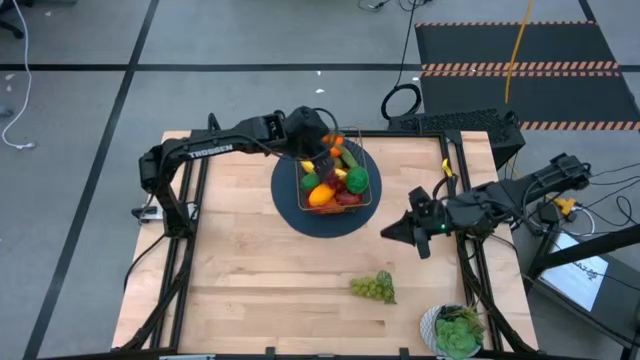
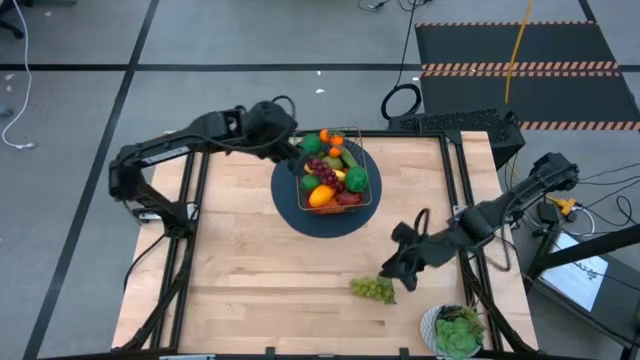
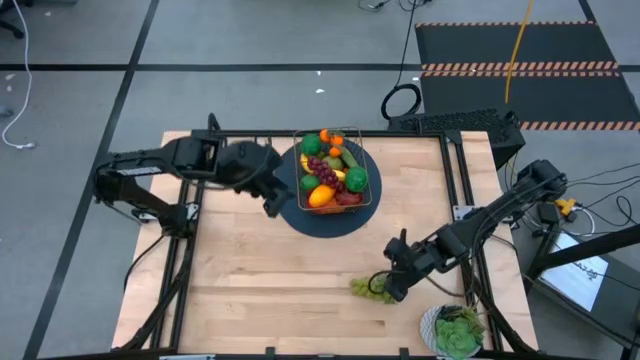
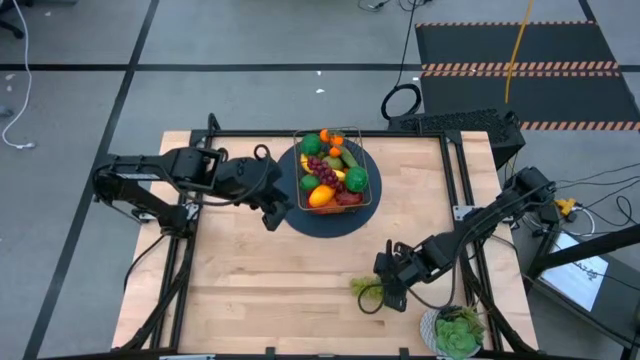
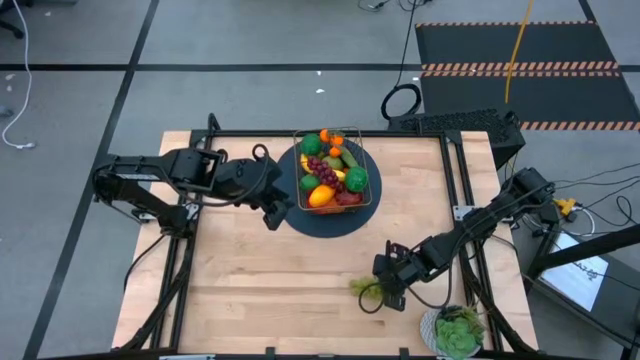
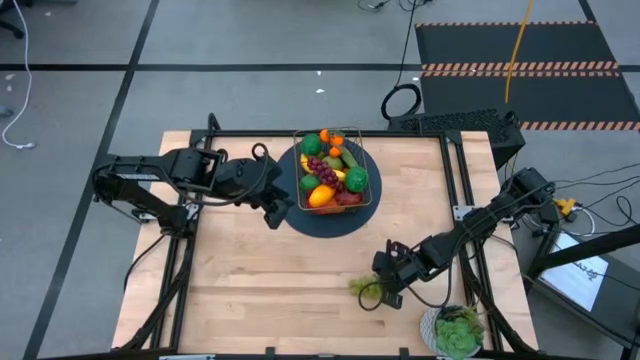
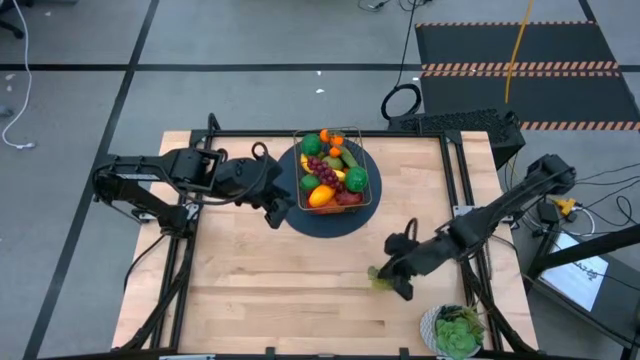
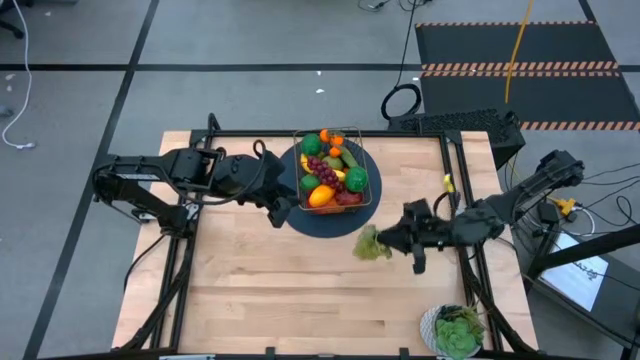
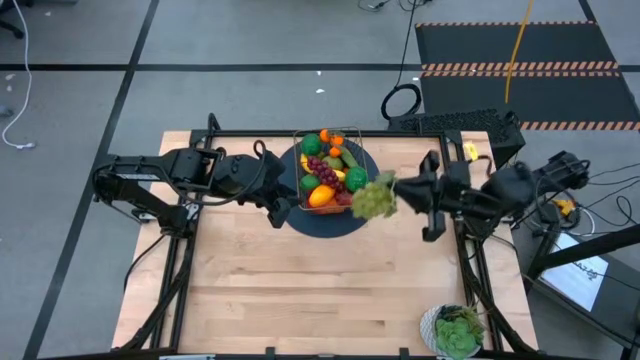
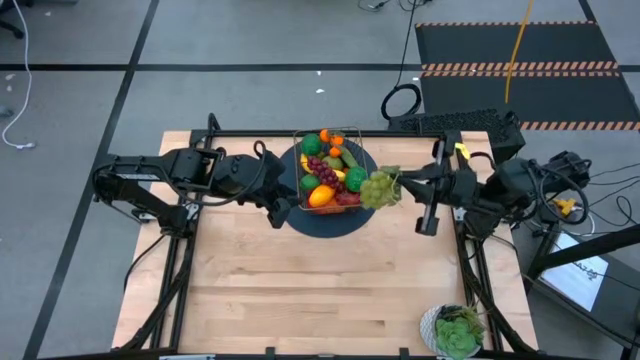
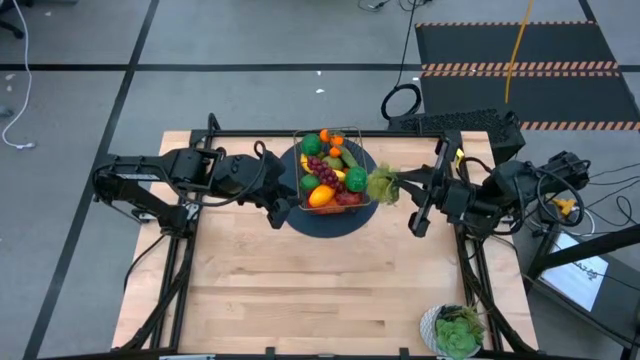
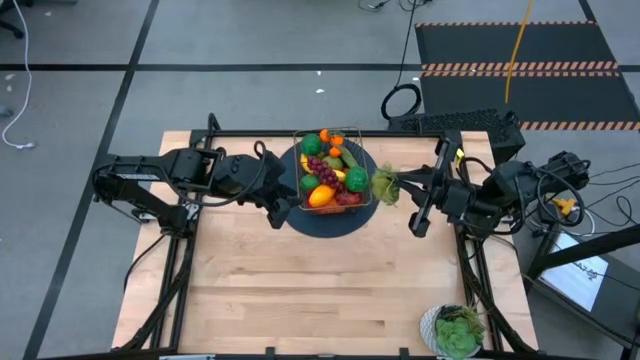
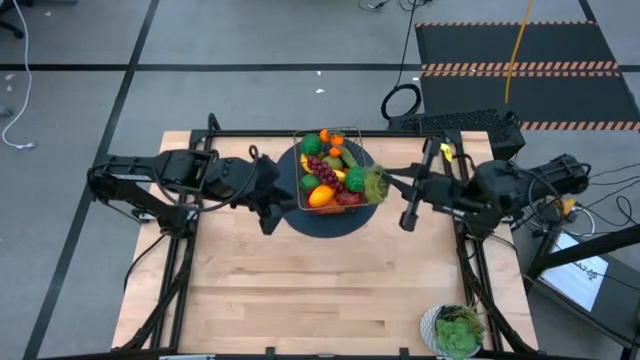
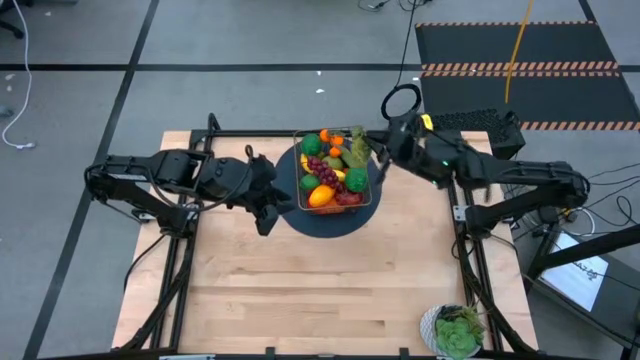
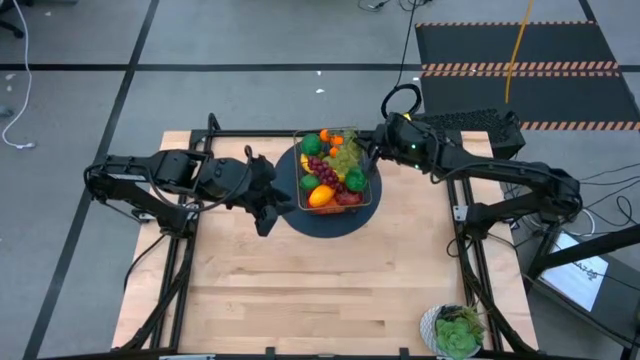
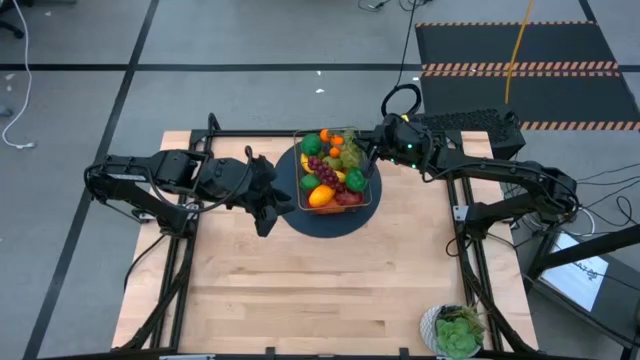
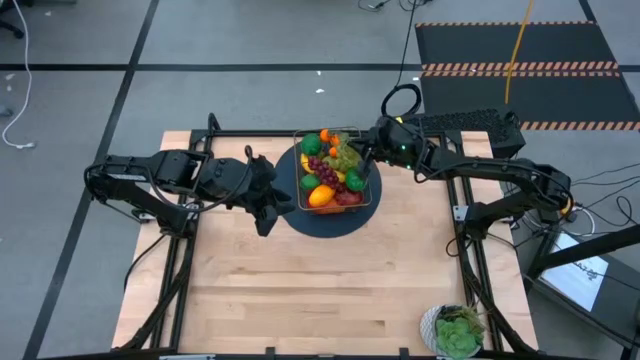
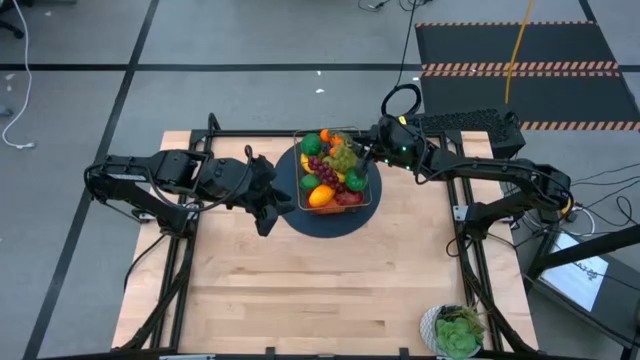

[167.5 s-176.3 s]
Task: Build produce basket
Put the green grapes into the gold wire basket

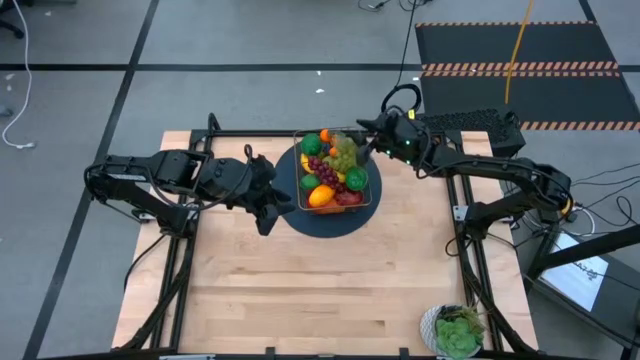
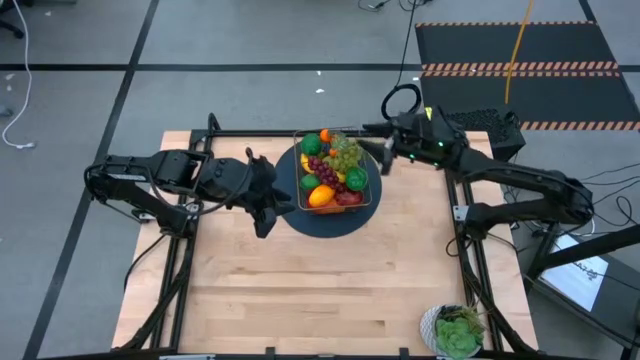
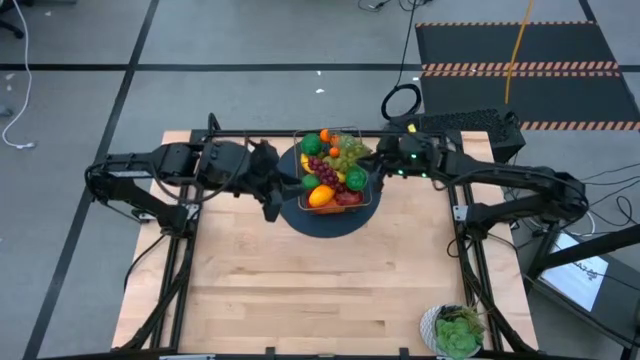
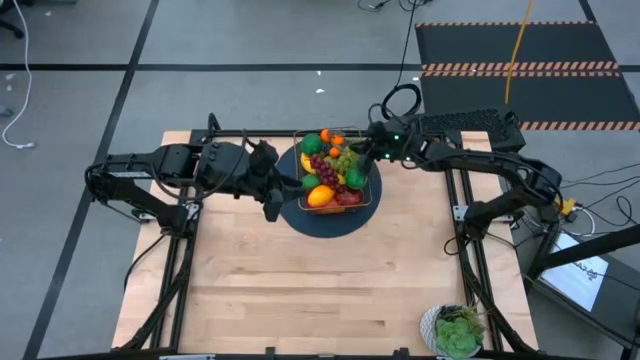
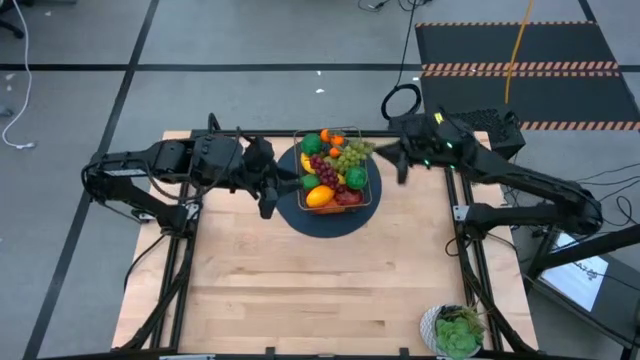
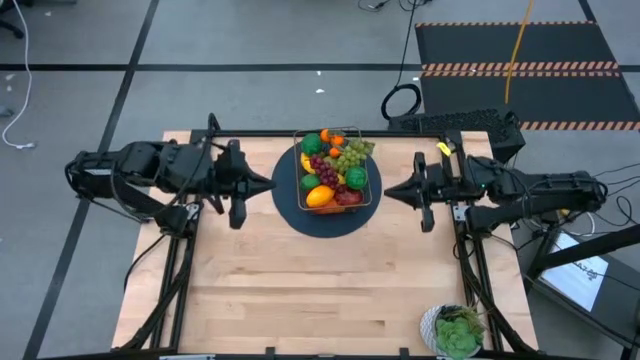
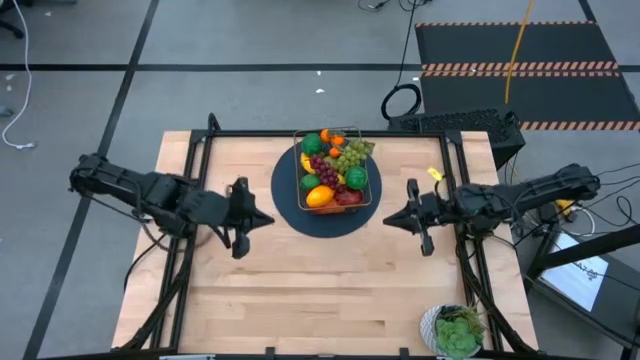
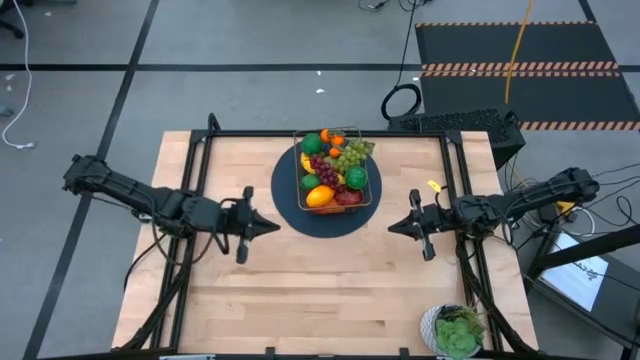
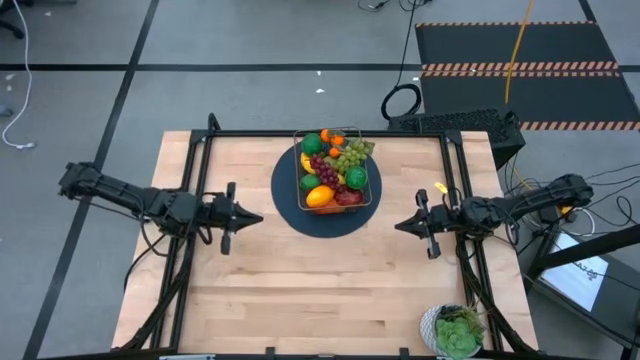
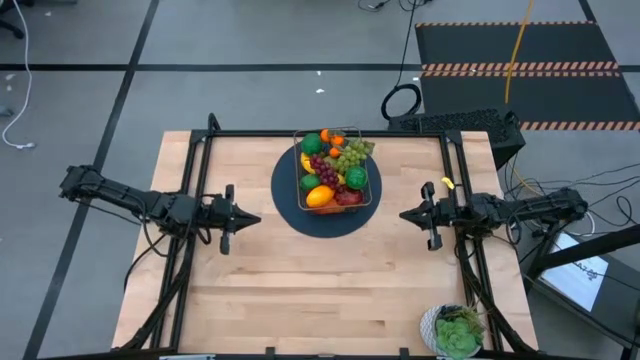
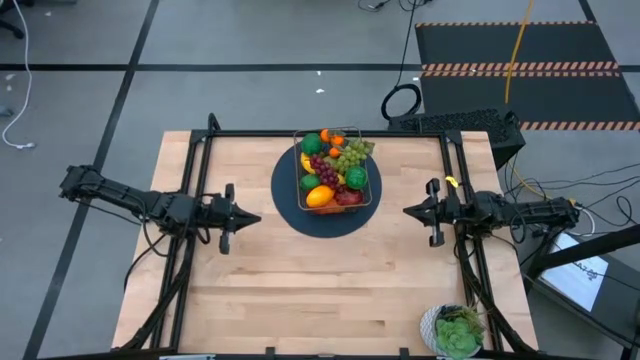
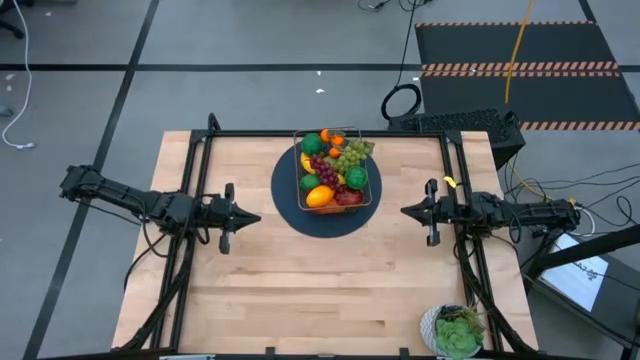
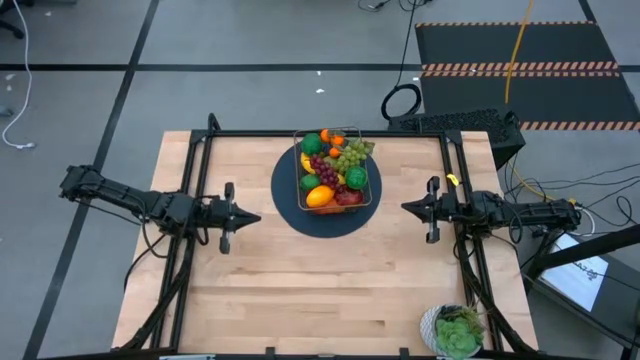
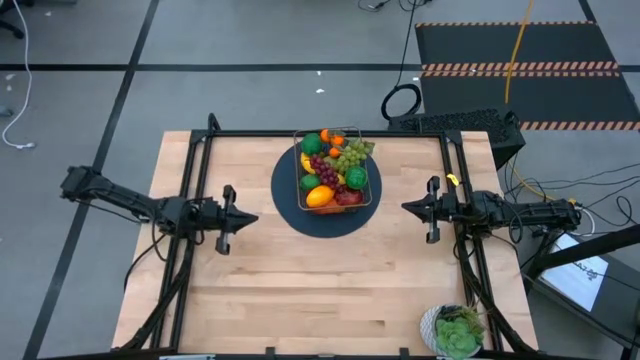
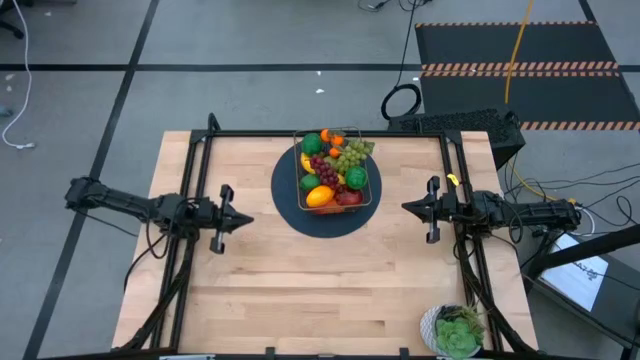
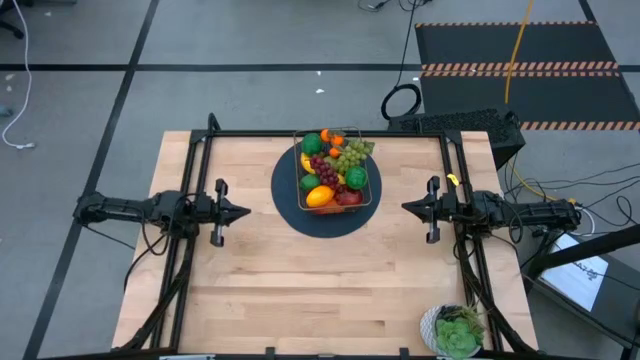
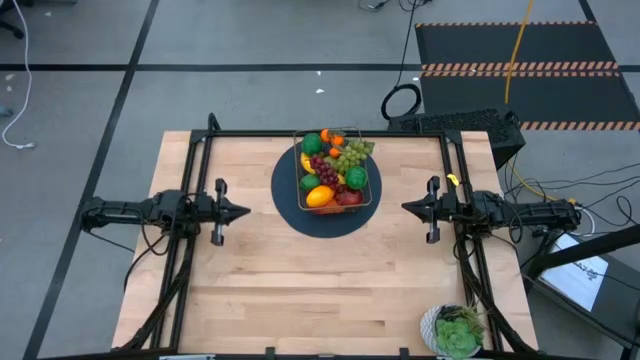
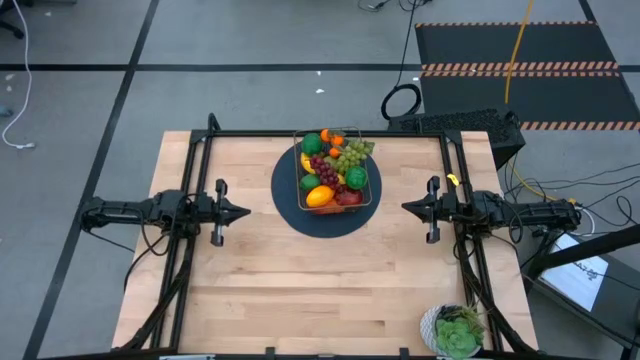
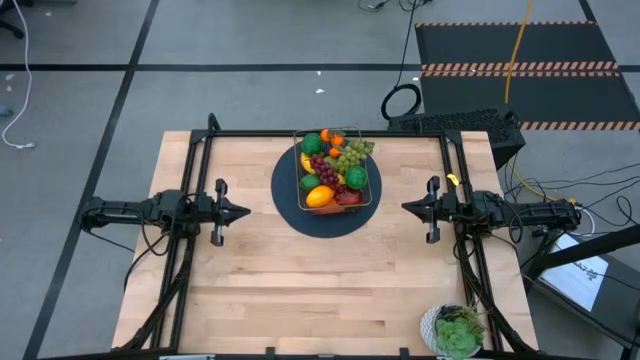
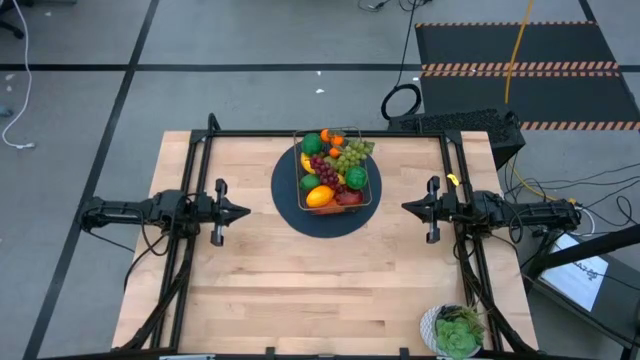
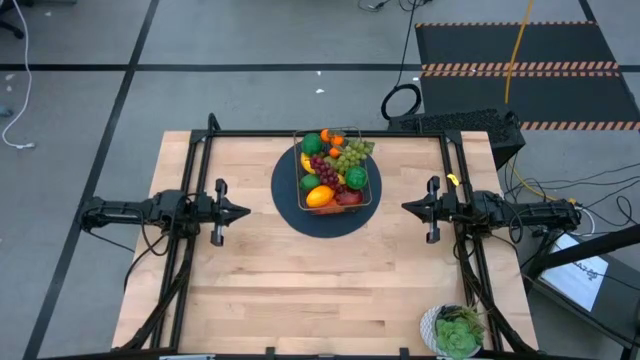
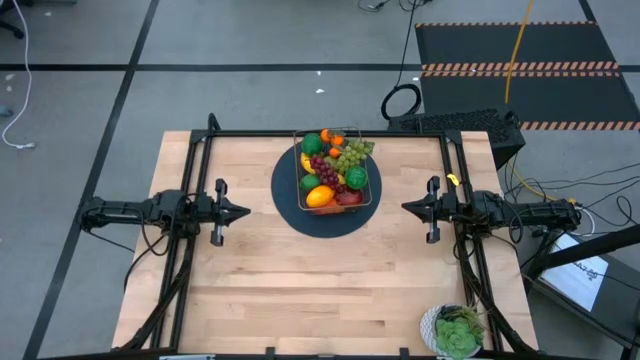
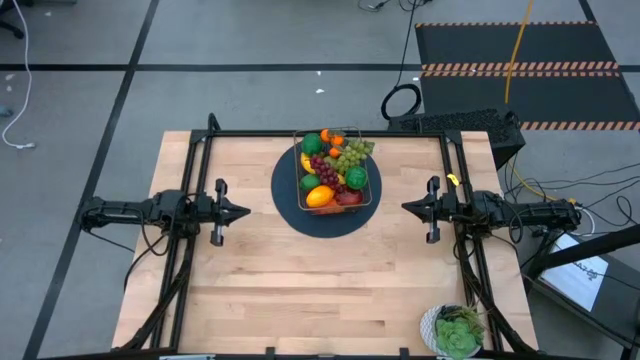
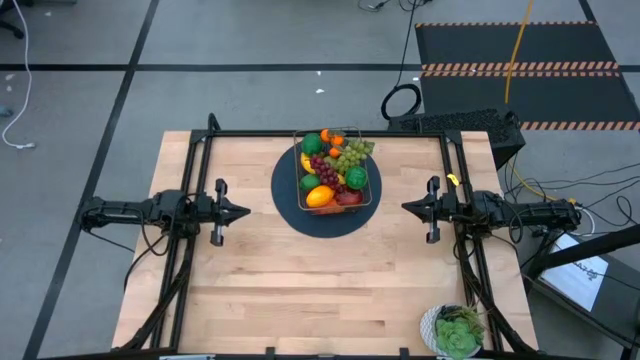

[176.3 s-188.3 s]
Return to Home Position
